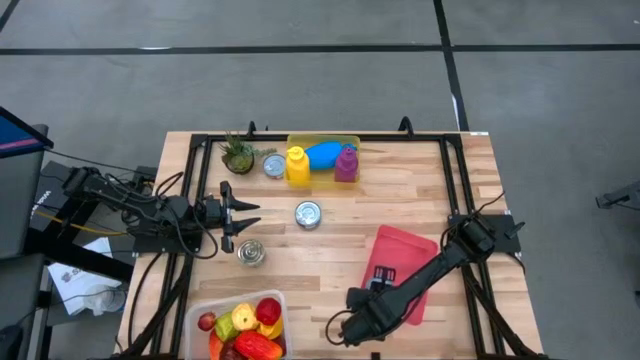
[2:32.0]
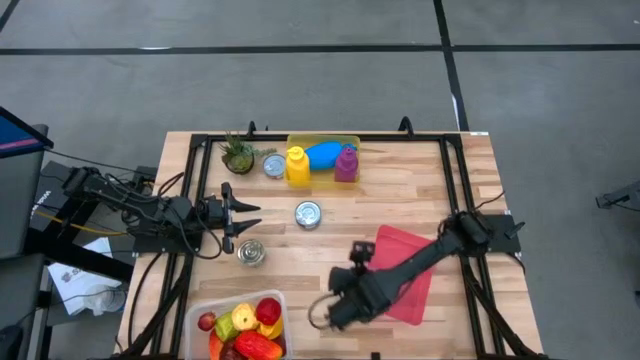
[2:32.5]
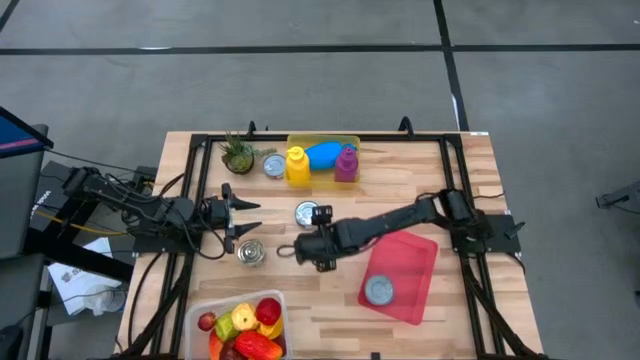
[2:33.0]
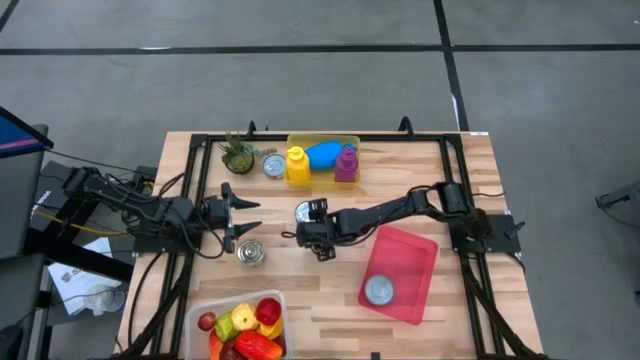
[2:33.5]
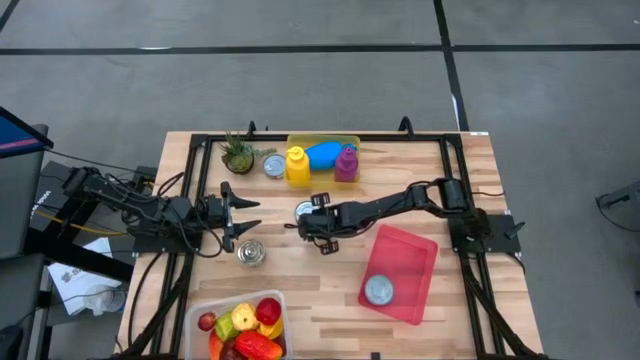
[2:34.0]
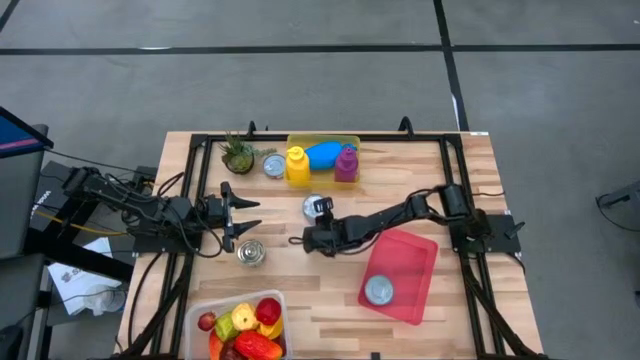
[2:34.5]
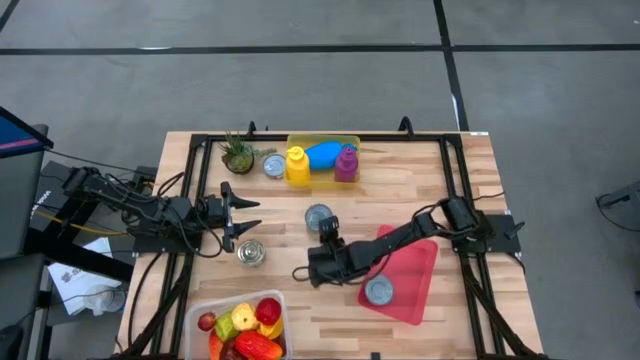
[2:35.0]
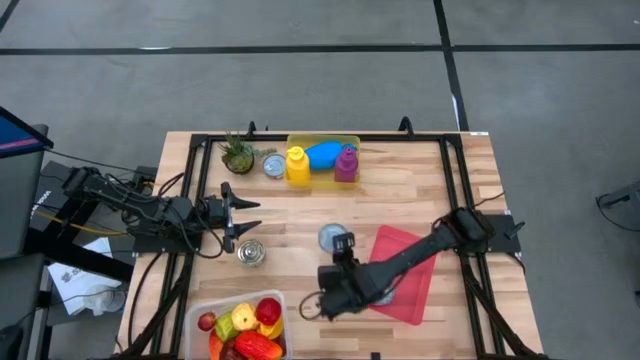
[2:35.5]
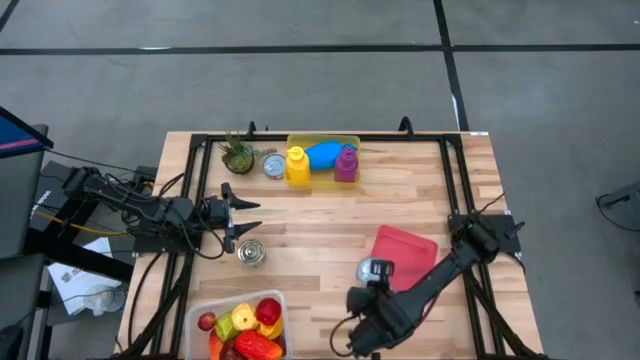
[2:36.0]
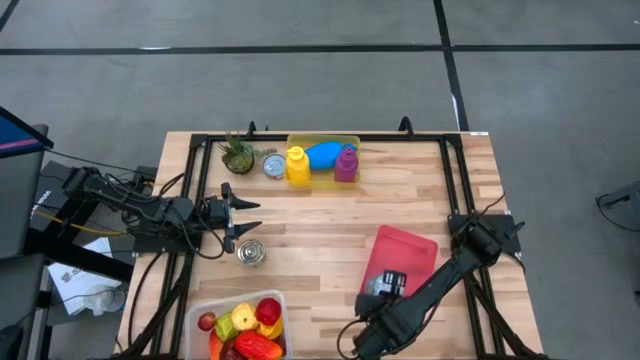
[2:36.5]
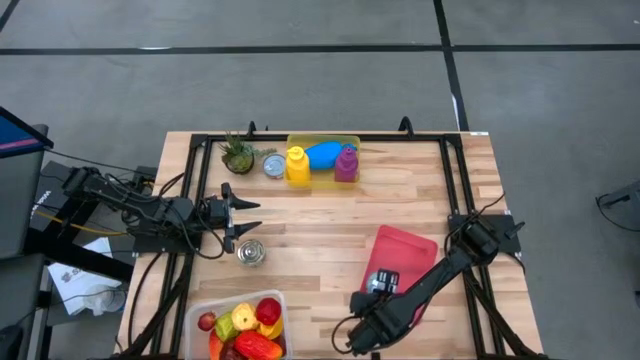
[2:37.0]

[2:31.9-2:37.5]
Task: Pick & Place Food Item
Put the blue tuna can into the red bin

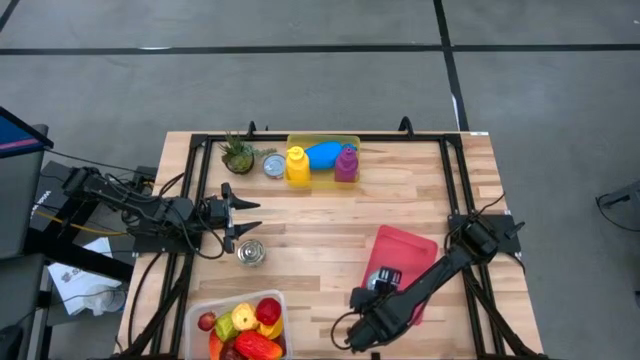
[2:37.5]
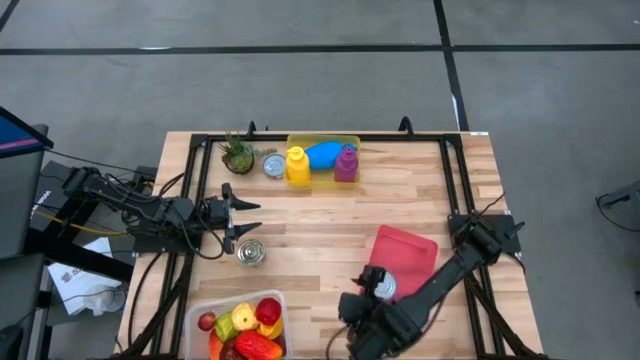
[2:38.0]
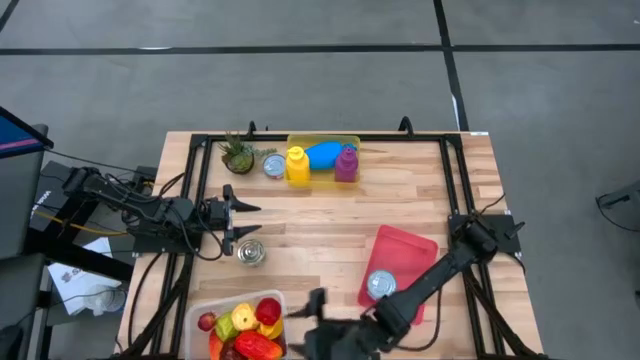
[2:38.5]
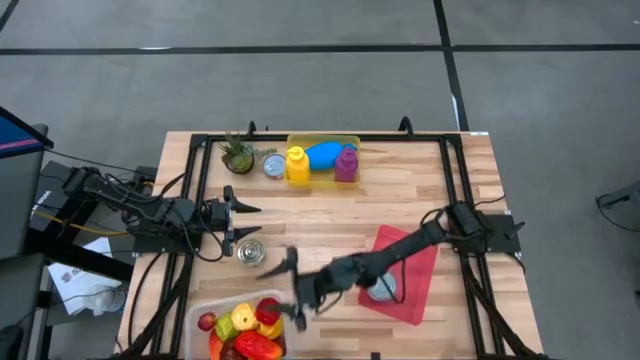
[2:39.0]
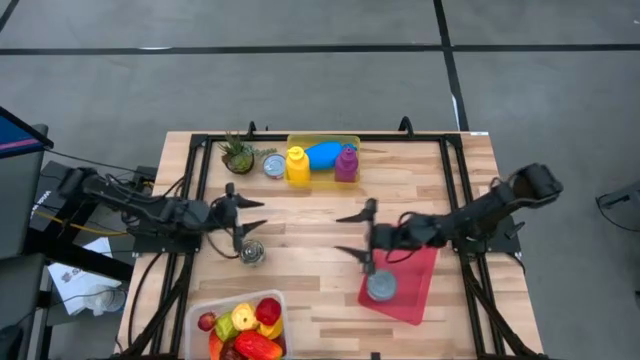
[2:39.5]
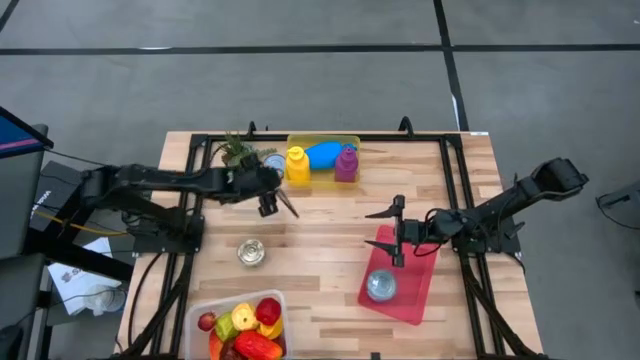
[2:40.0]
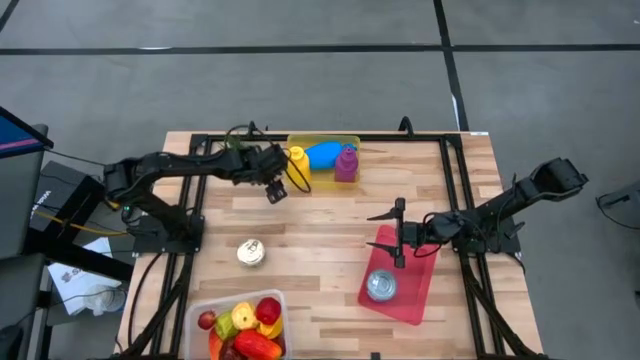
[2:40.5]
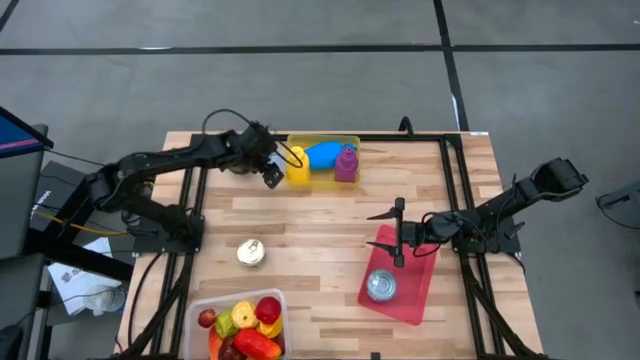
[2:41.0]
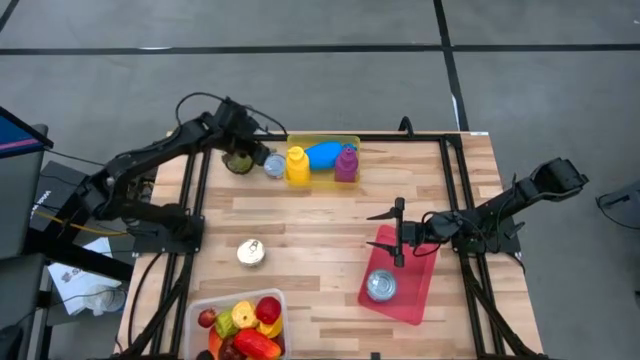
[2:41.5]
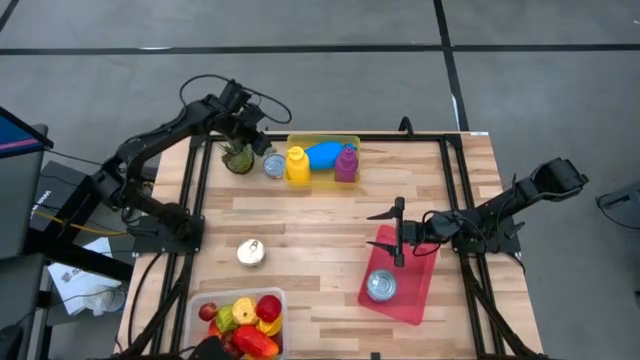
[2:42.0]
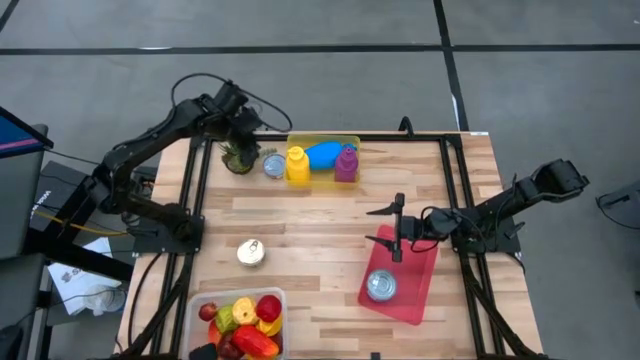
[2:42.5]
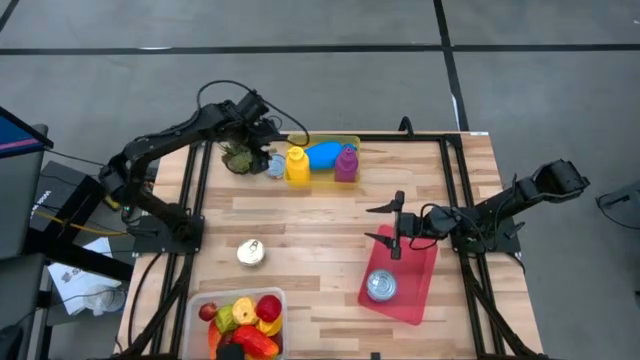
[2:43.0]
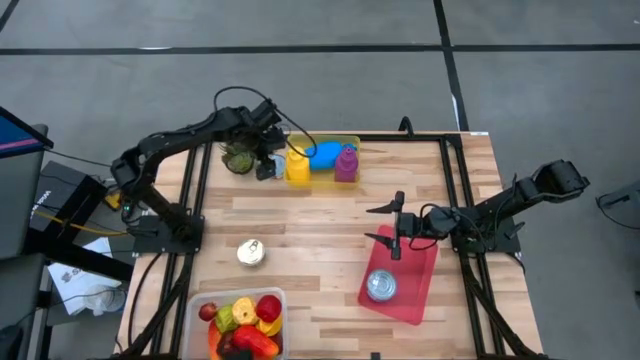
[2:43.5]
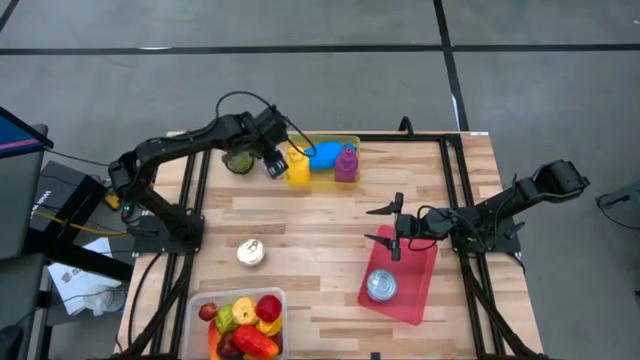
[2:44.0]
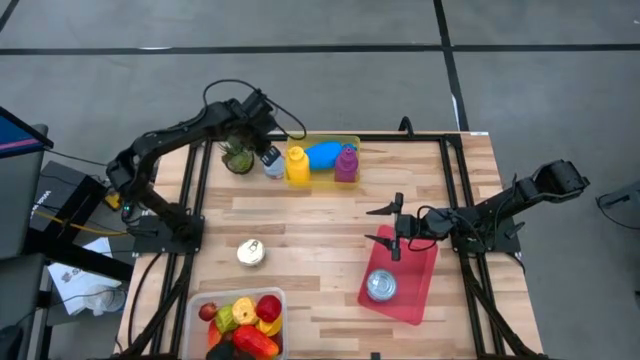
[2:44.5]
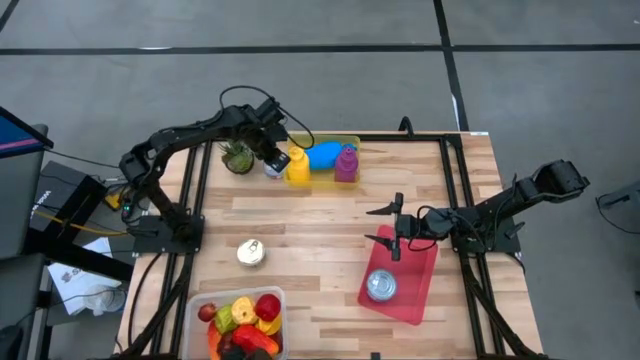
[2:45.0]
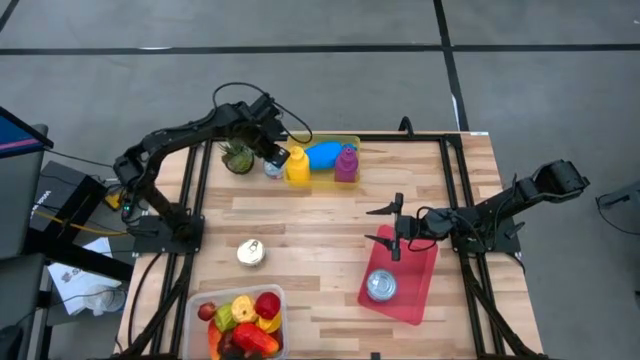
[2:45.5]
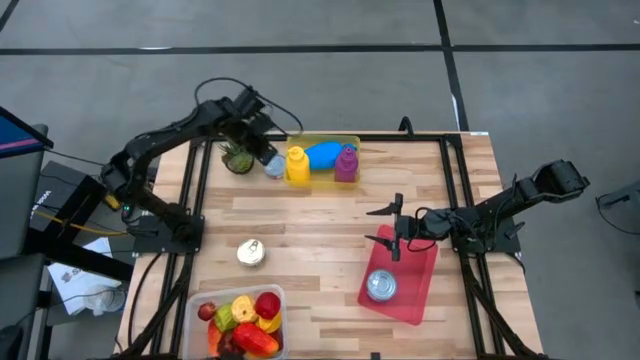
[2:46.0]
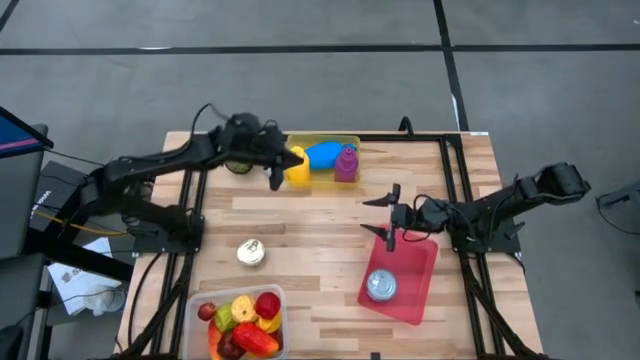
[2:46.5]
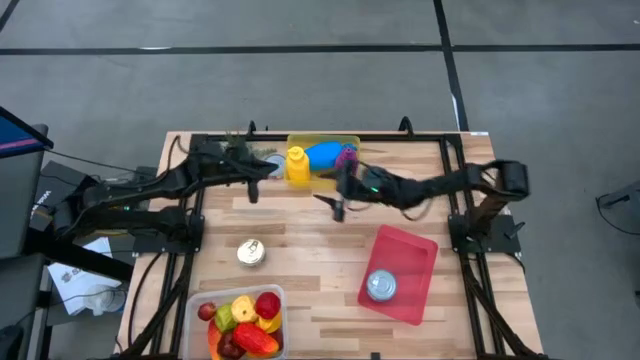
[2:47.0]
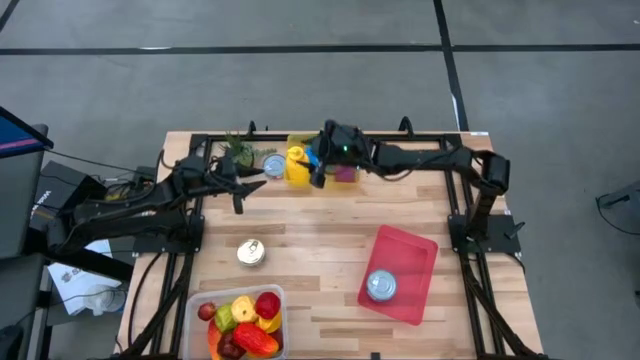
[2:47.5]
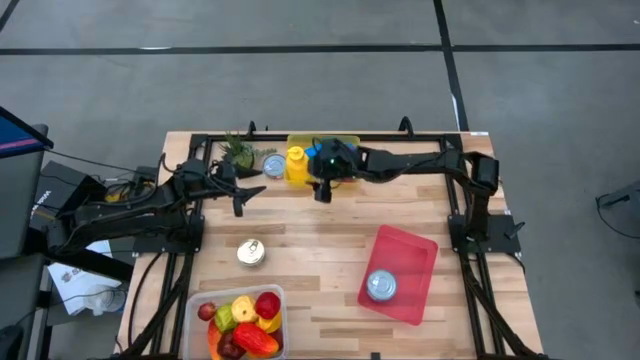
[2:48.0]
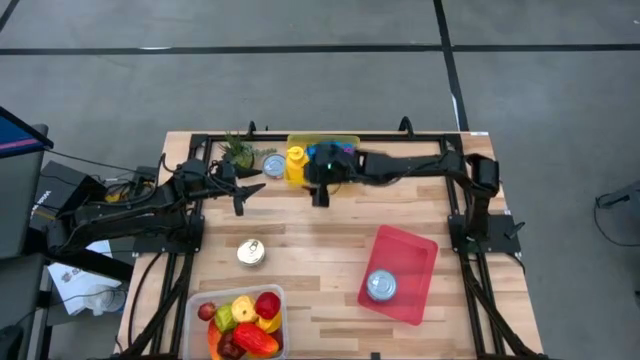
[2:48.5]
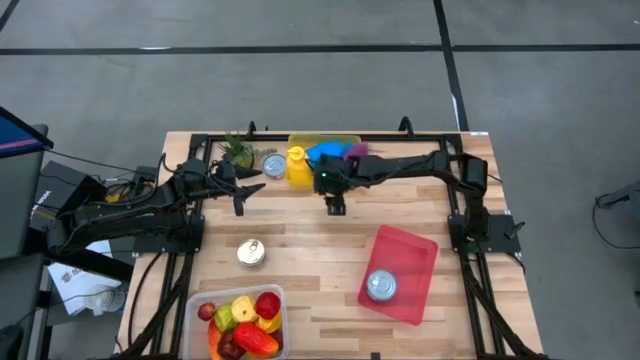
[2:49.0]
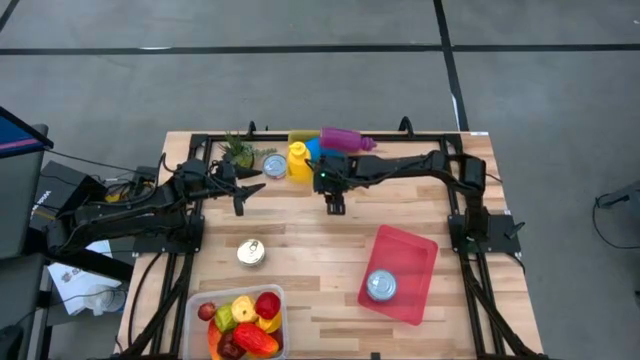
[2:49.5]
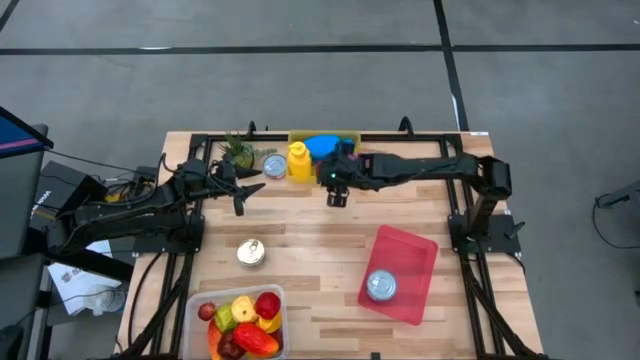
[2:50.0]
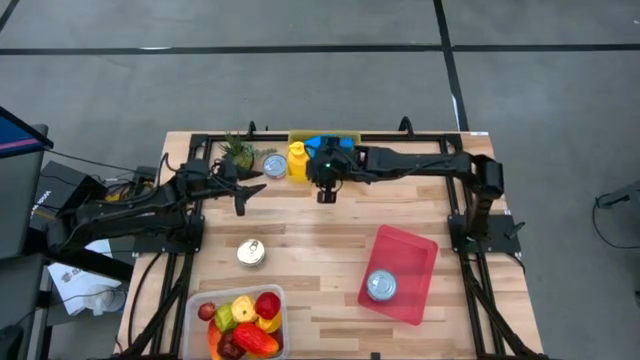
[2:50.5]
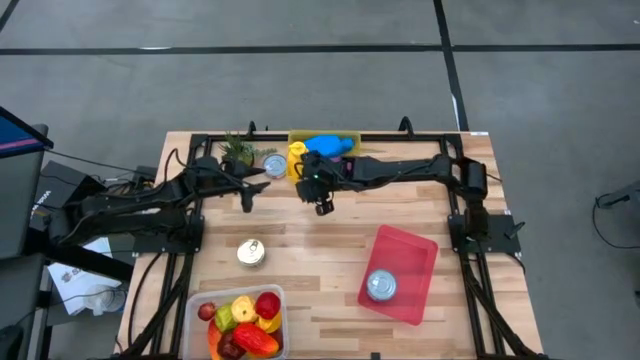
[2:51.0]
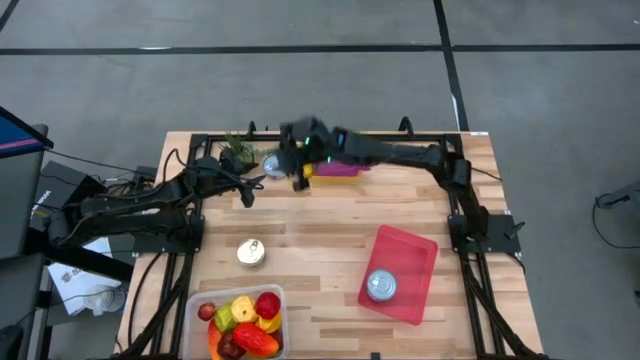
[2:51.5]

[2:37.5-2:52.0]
Put the red tuna can into the red bin

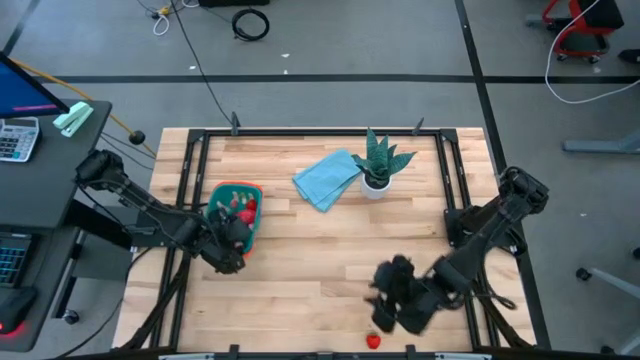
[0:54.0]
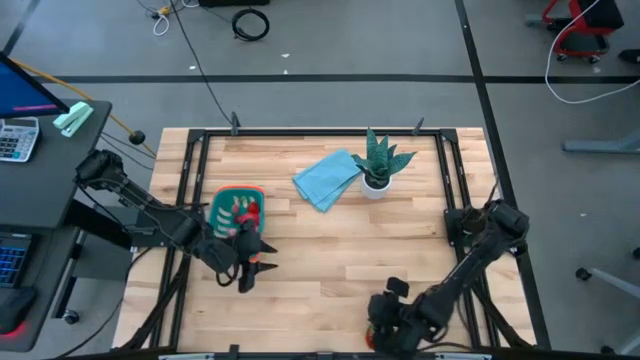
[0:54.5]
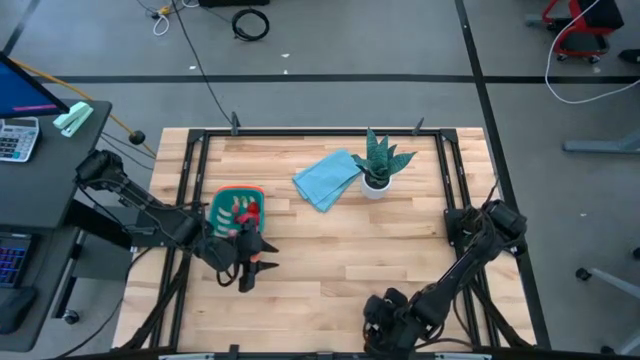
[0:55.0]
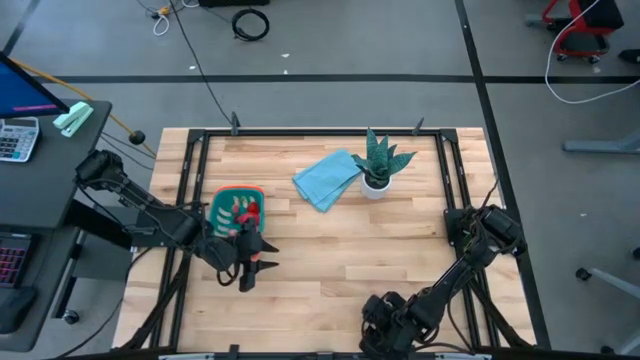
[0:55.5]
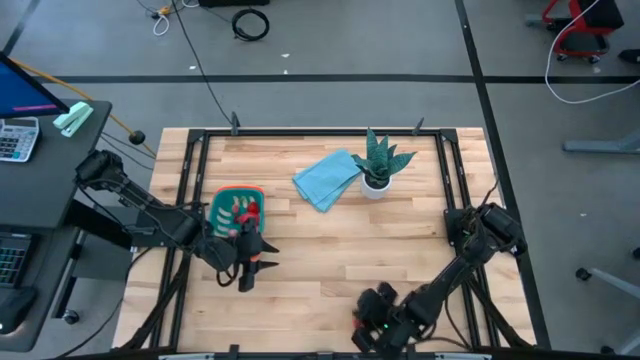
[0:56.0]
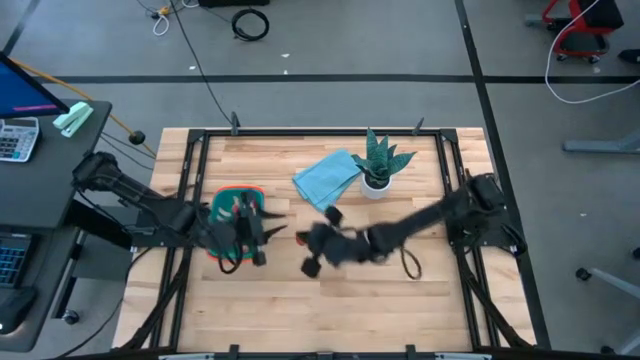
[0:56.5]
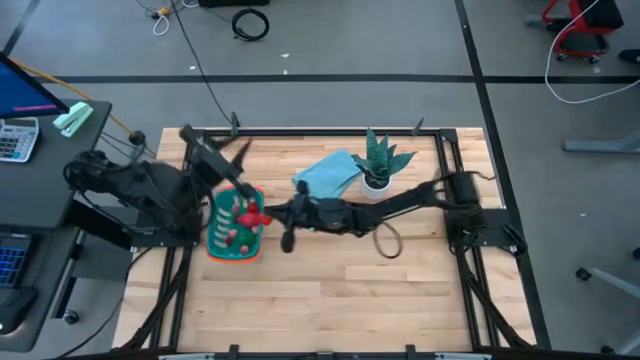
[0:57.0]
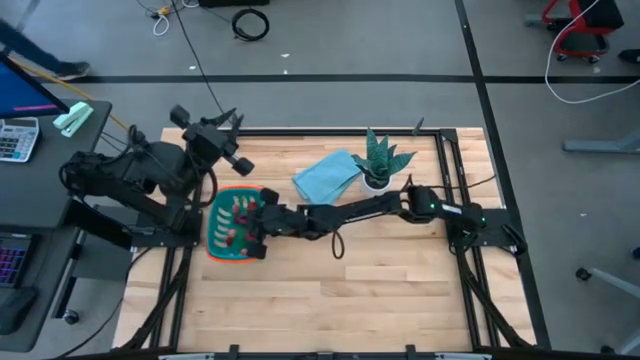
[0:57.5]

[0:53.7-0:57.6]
Task: Pick and placing Produce into tupperware
Put the red strawberry into the blue basket
